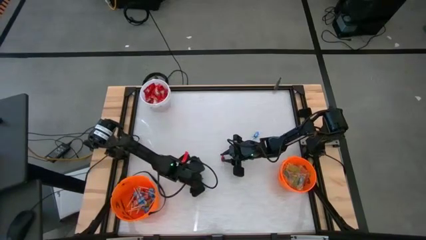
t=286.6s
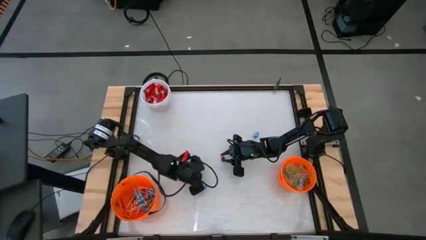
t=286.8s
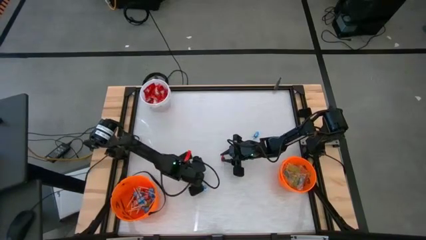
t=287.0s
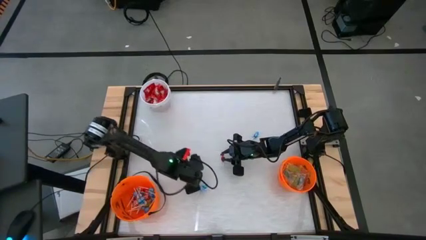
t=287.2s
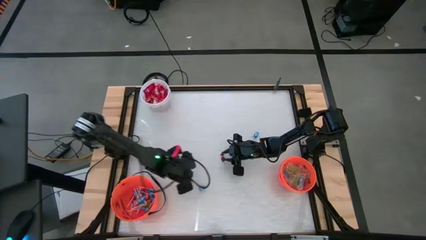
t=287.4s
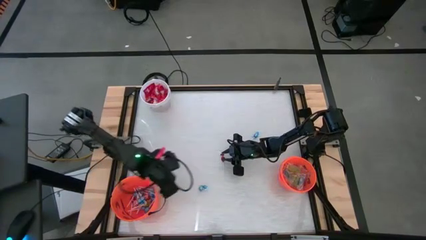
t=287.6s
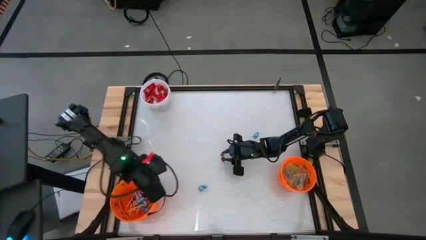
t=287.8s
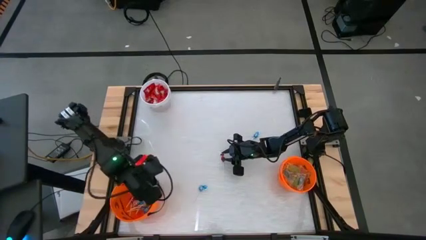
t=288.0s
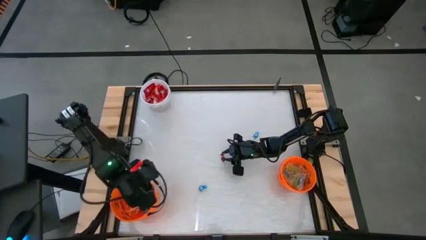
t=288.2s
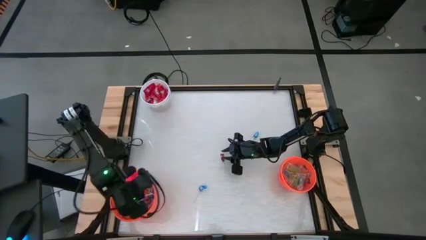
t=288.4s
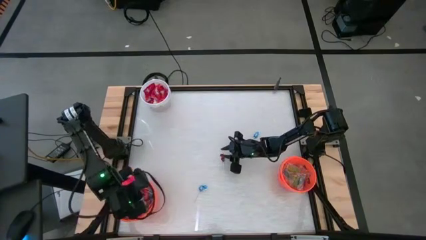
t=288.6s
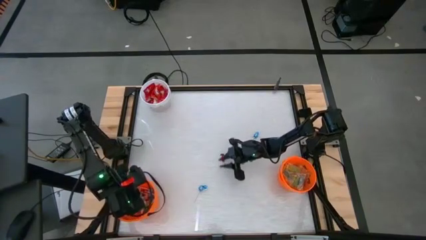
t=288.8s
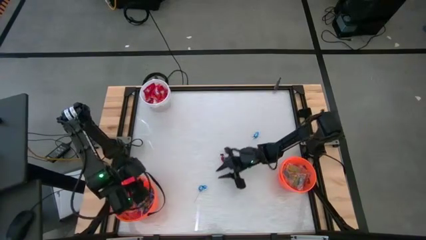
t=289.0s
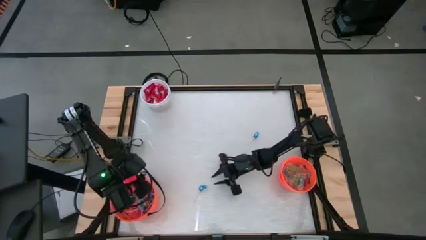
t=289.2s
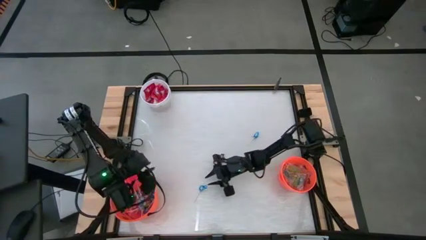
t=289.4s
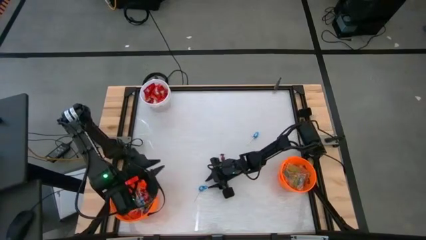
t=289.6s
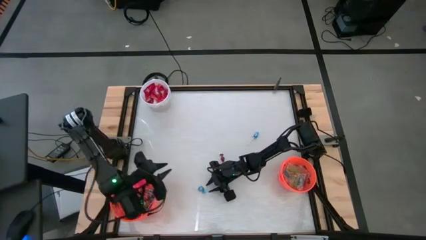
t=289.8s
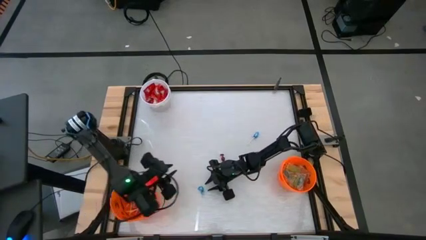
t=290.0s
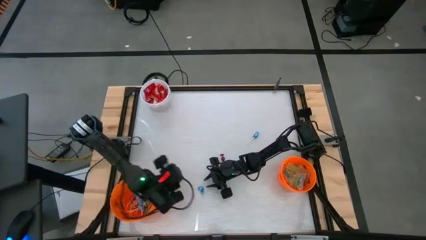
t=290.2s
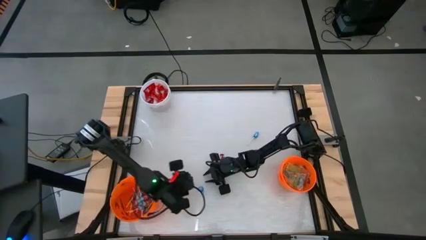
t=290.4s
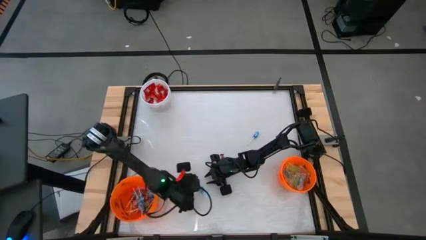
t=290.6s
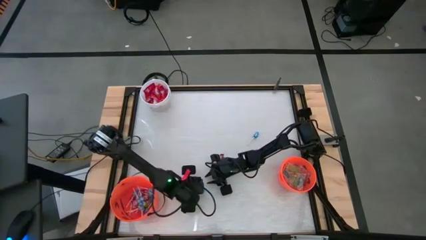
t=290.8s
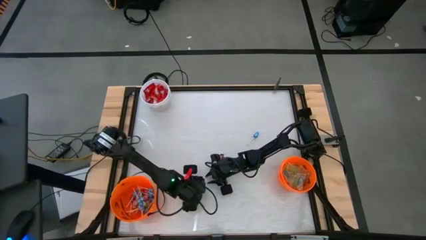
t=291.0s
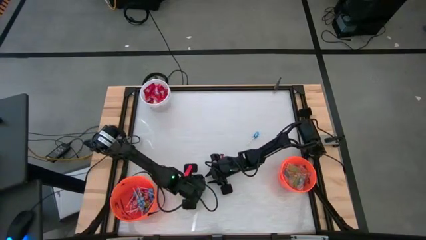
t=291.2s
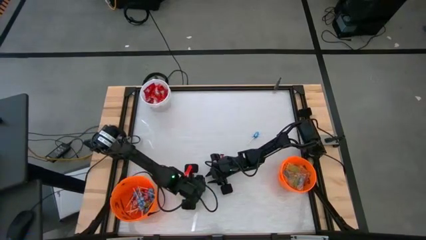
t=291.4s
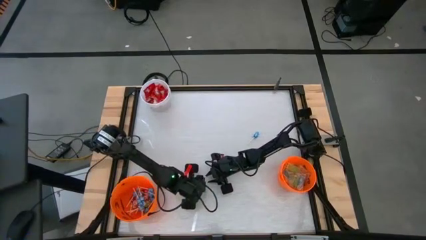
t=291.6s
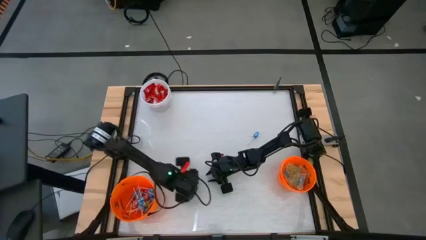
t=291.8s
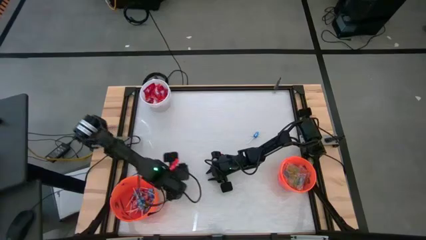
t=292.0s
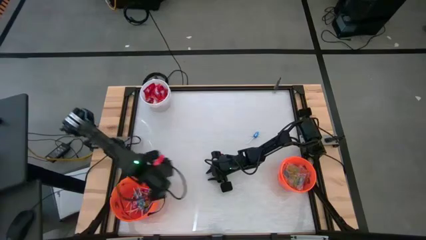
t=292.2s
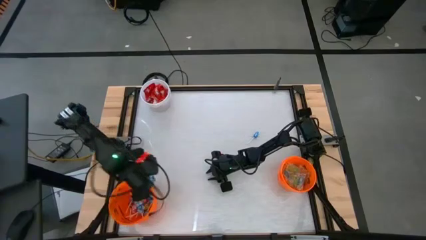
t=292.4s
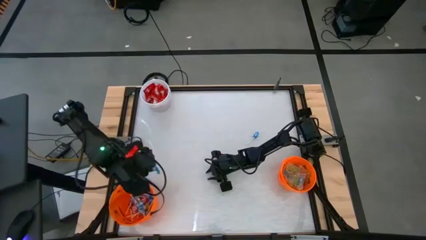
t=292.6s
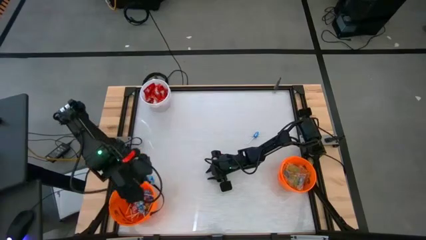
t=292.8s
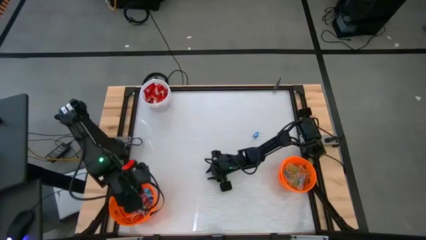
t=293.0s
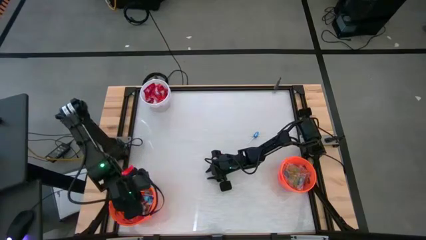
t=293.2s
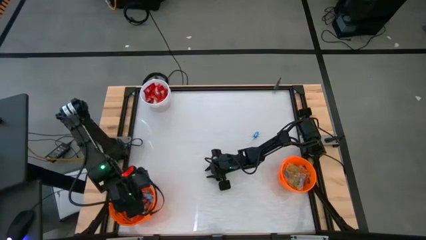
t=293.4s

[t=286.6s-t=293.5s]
Task: Sort candy by brand, put in halloween buckets
Put the left blue sucker into the left orange bucket

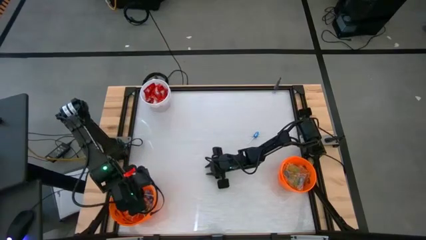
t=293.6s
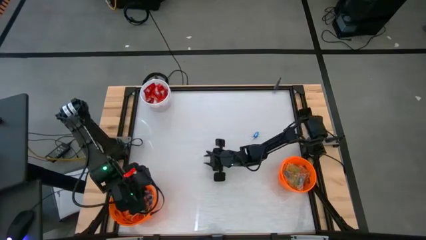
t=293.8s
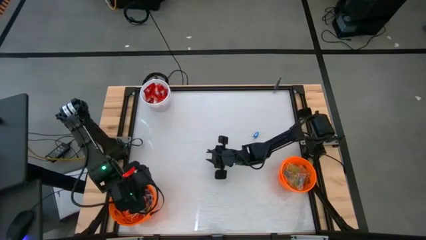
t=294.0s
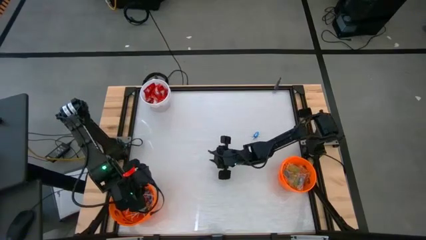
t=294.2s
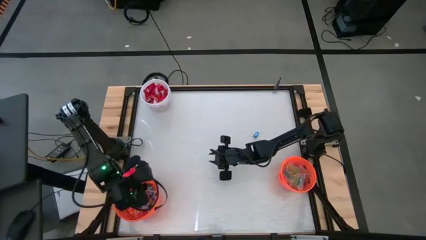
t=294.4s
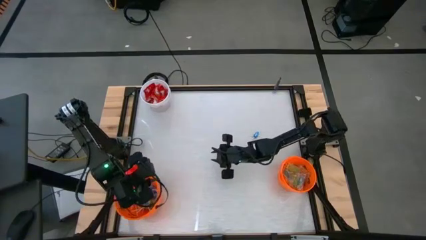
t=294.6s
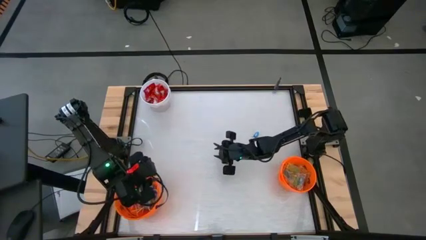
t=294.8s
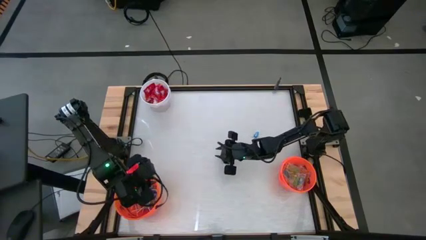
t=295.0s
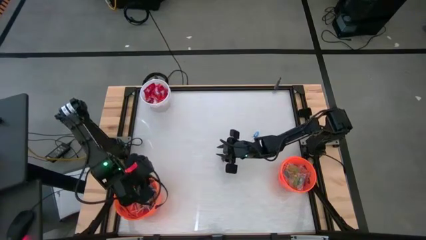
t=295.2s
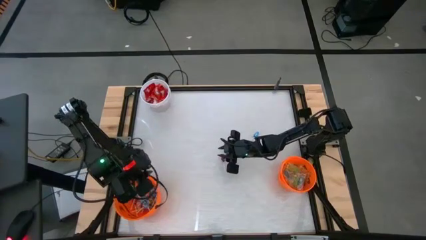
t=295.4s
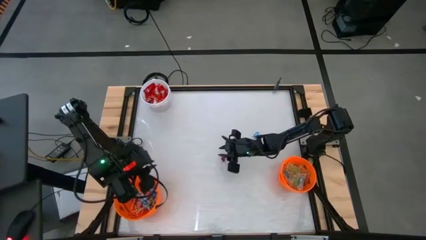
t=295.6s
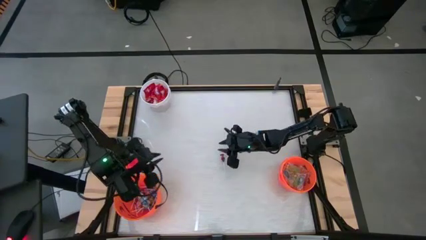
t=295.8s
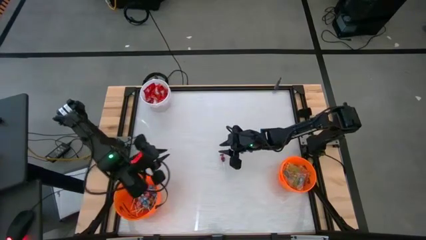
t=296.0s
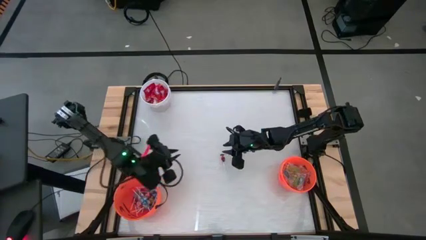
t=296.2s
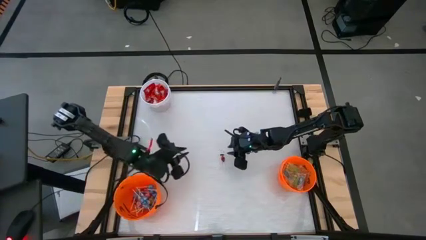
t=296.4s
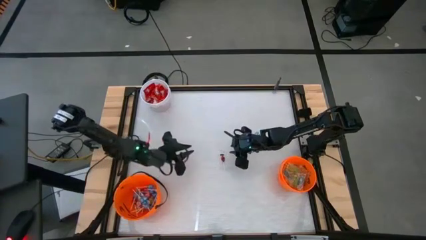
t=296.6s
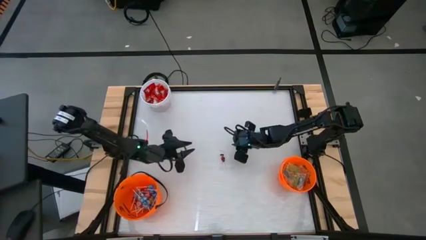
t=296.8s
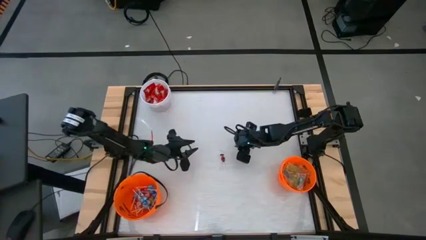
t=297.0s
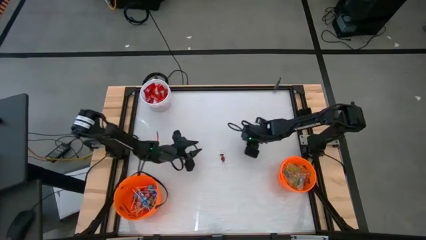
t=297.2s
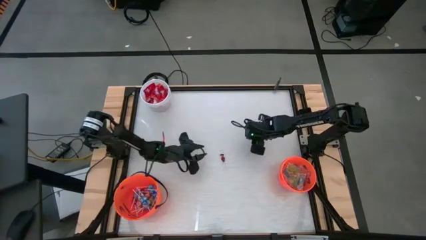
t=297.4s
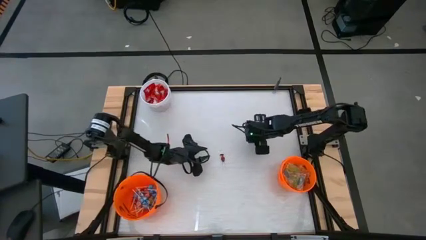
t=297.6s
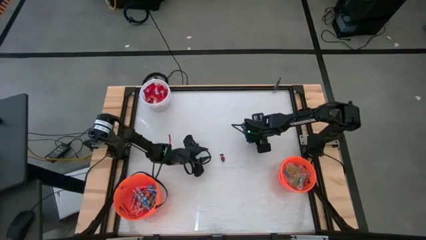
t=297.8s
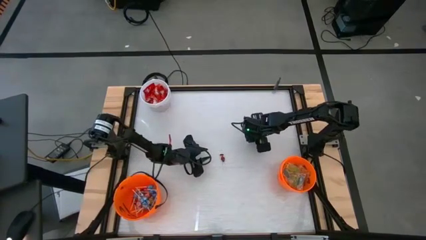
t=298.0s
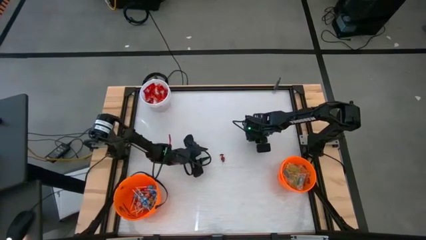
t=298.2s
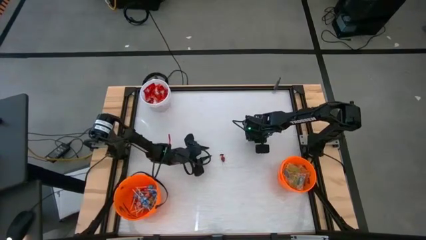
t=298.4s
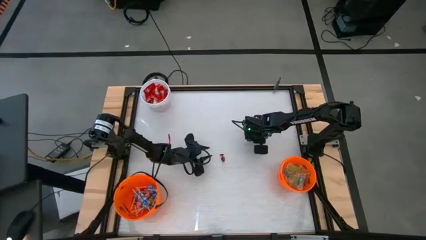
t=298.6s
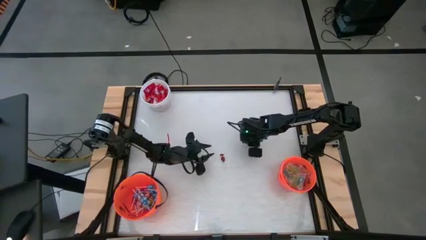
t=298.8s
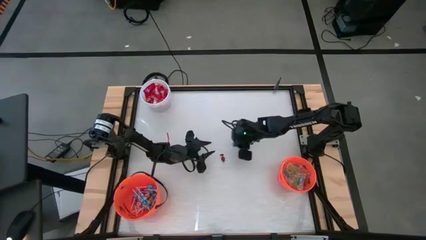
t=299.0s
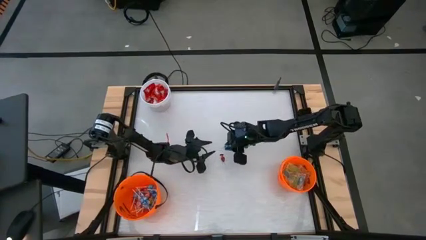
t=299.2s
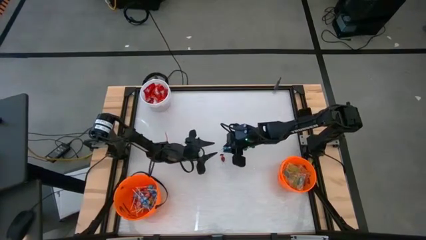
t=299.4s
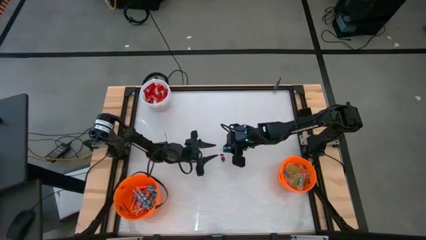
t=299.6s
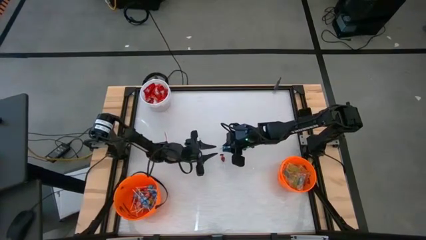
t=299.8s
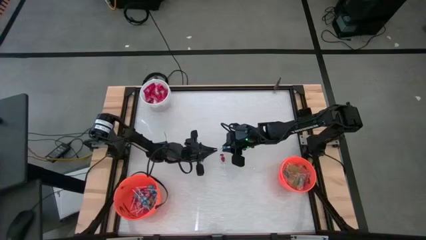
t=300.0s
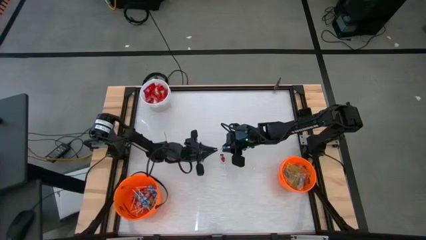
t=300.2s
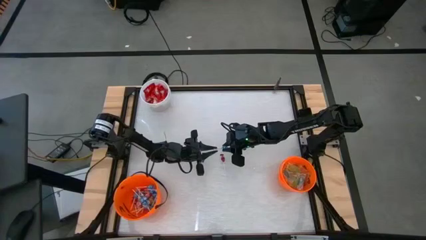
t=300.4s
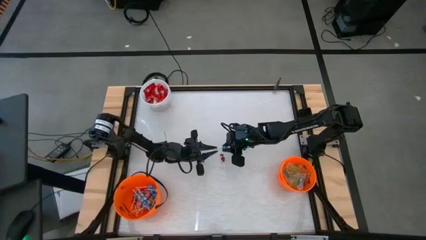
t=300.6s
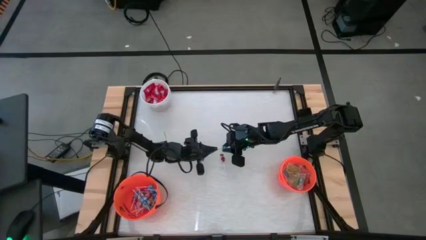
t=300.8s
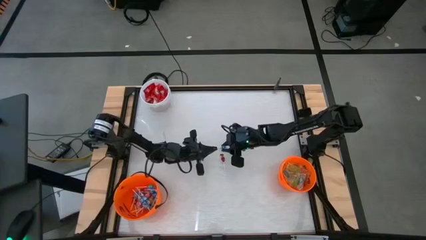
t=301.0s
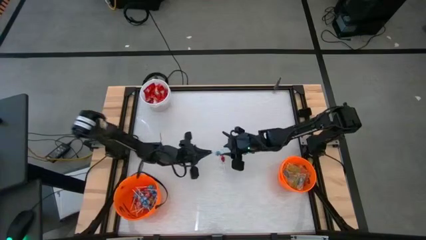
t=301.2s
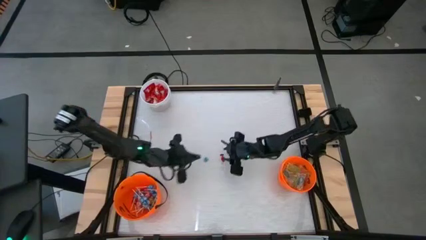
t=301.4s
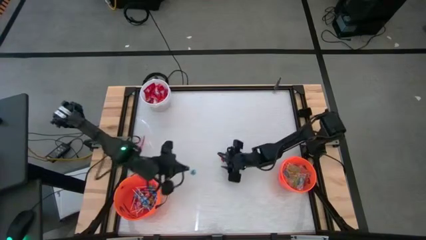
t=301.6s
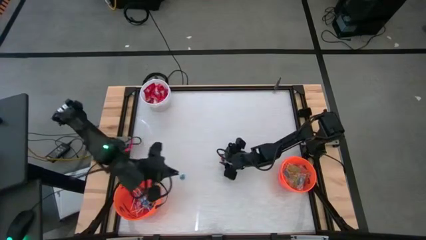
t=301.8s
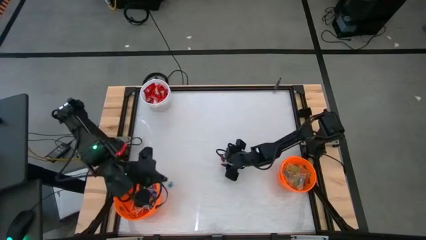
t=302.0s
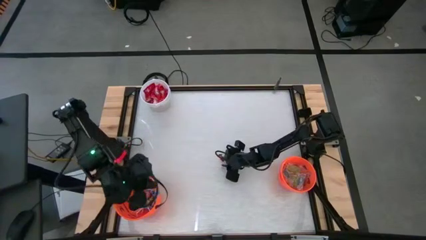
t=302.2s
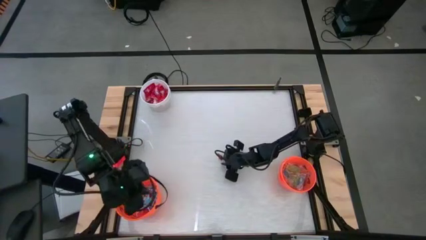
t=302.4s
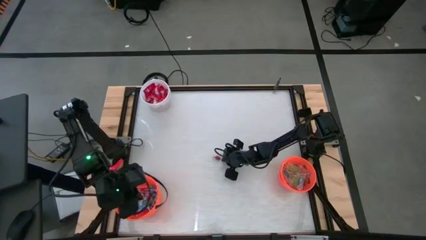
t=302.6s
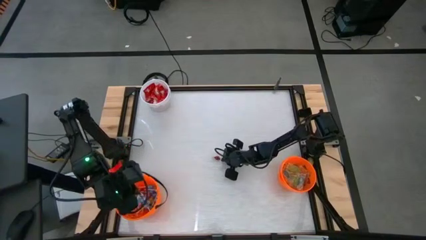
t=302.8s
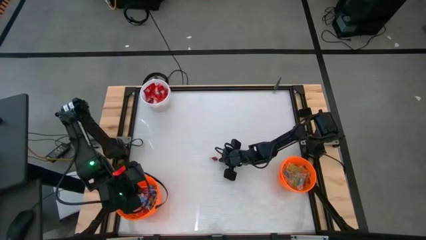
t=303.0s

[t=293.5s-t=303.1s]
Put the blue sucker into the left orange bucket

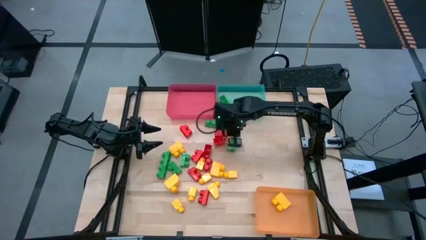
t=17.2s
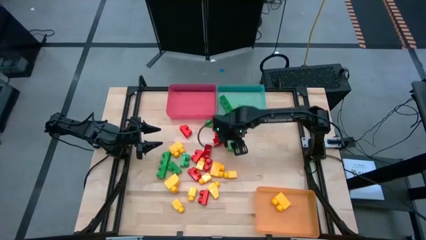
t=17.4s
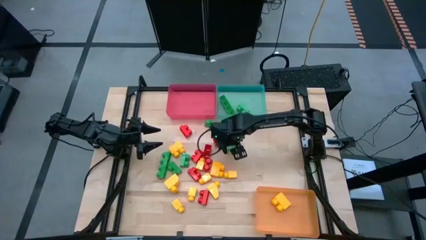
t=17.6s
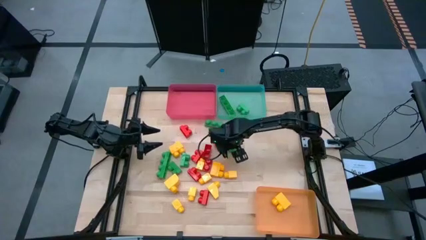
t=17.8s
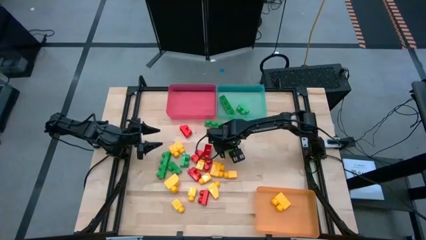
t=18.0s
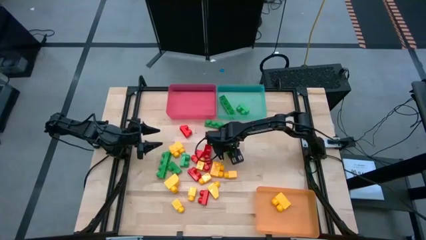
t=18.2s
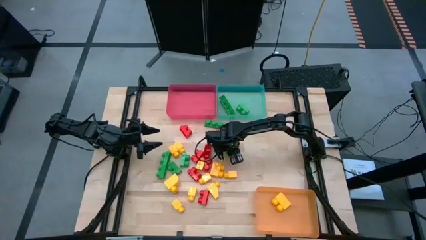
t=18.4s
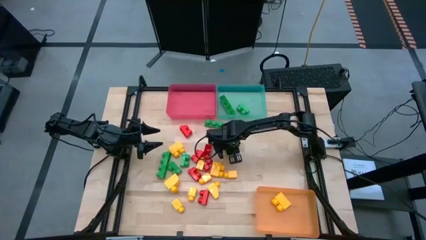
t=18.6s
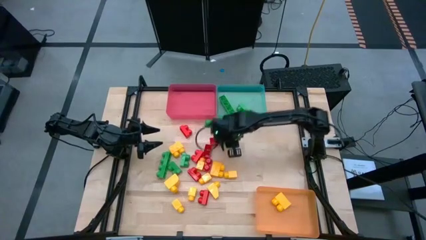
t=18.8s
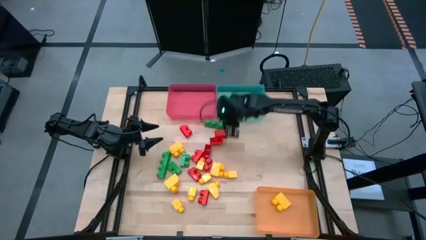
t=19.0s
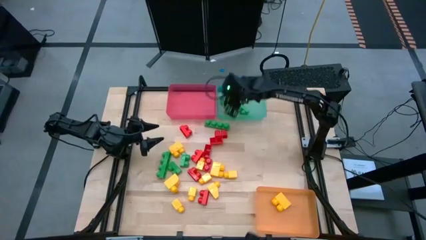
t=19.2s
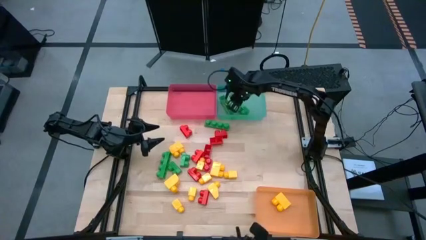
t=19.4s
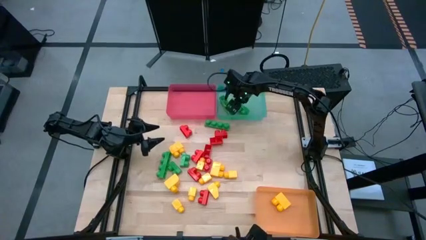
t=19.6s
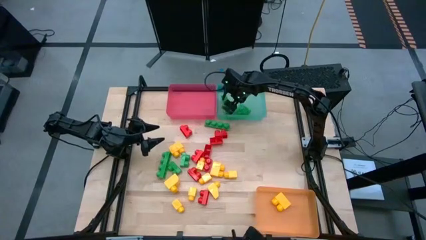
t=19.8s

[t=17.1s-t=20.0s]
Task: Sort blocks
Put the green game piece into the green bin
